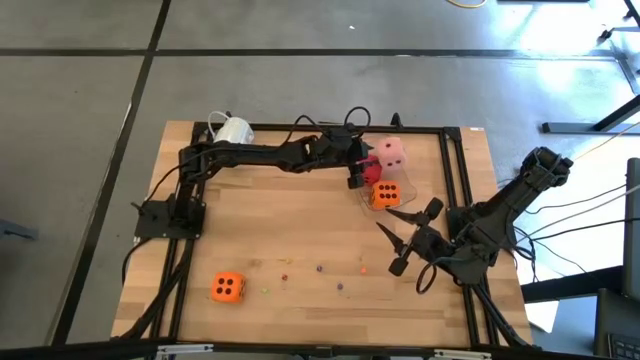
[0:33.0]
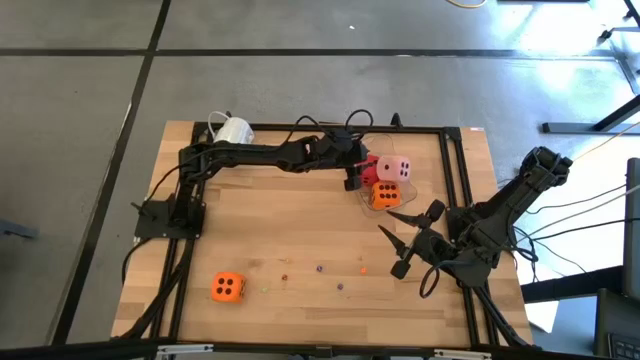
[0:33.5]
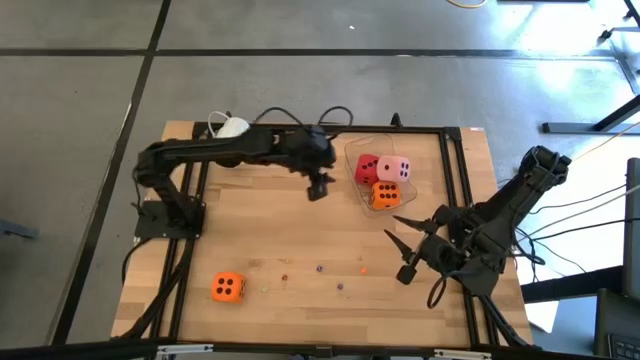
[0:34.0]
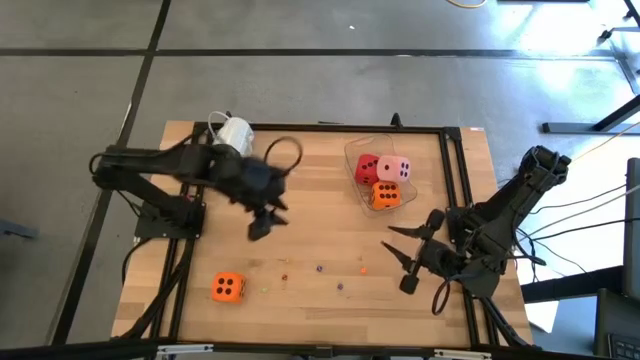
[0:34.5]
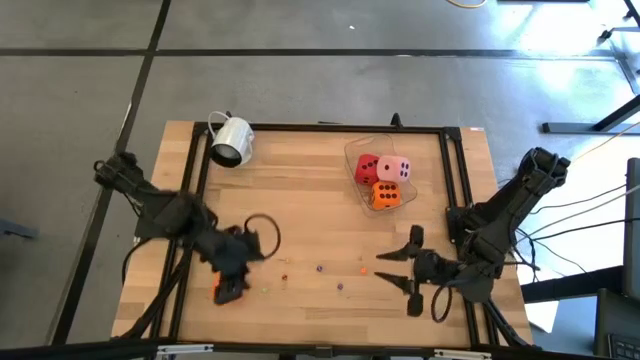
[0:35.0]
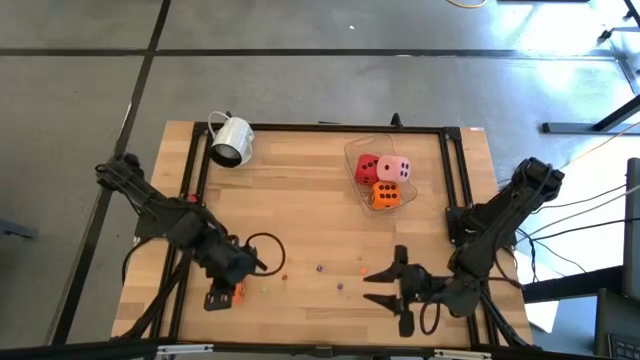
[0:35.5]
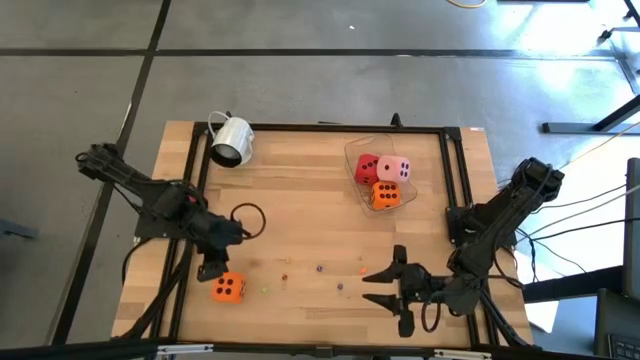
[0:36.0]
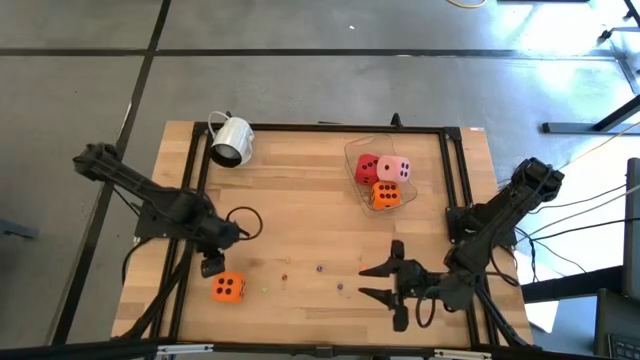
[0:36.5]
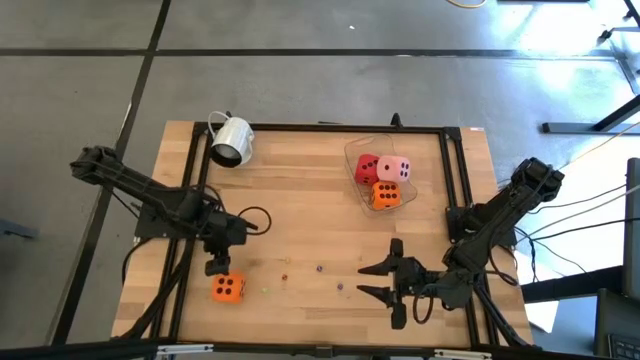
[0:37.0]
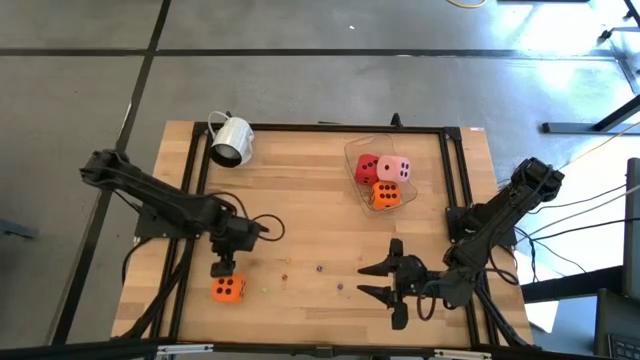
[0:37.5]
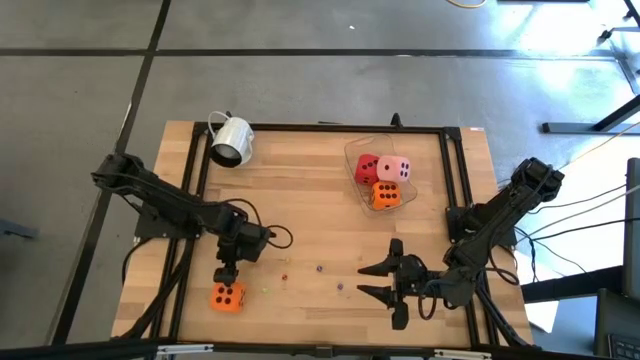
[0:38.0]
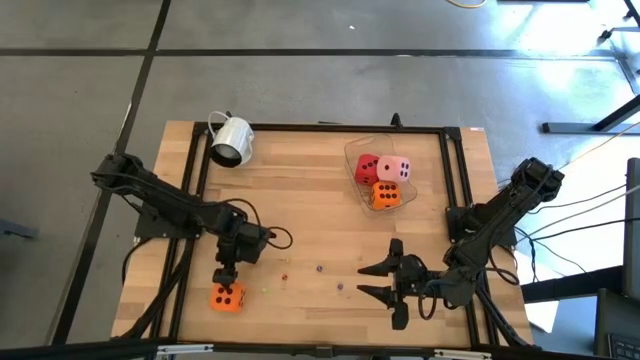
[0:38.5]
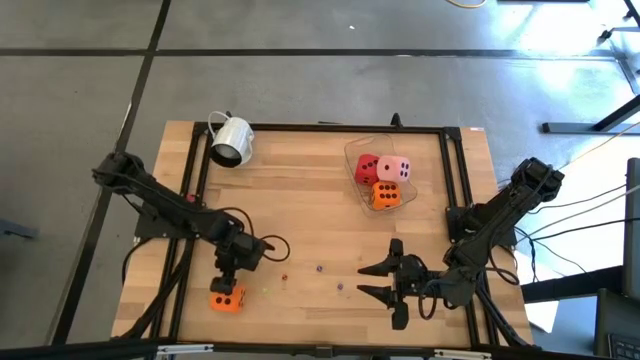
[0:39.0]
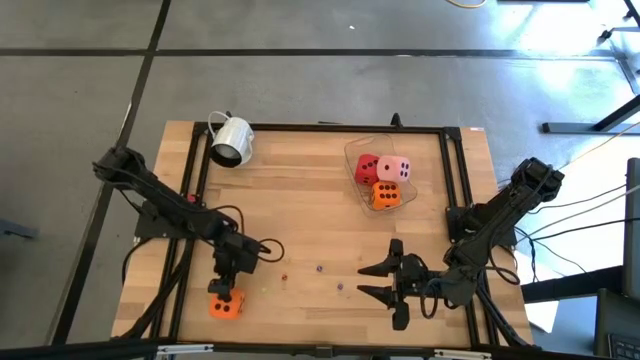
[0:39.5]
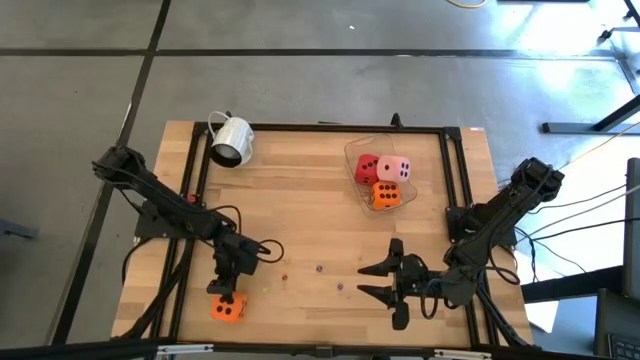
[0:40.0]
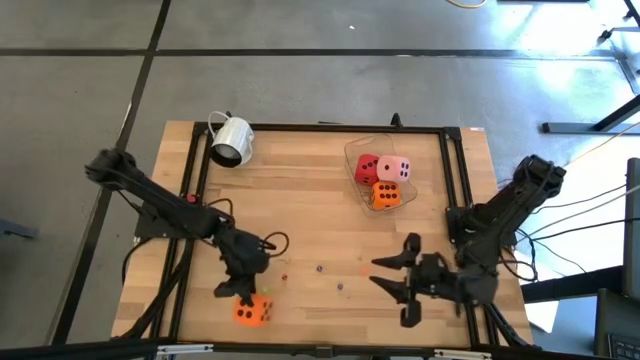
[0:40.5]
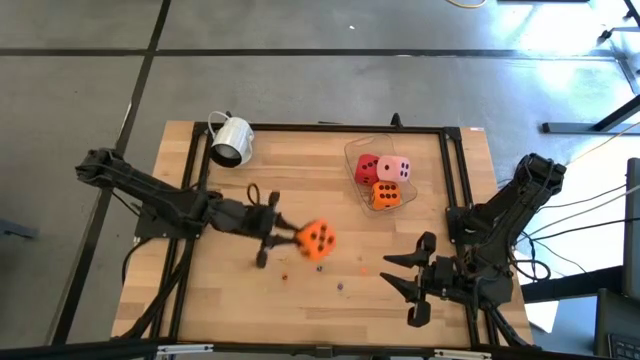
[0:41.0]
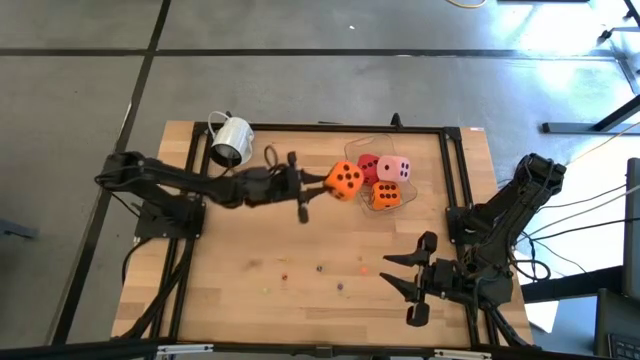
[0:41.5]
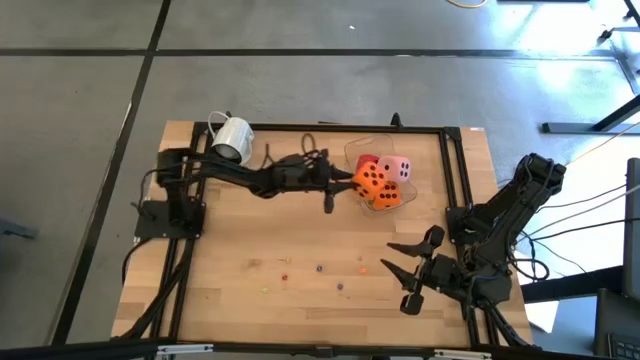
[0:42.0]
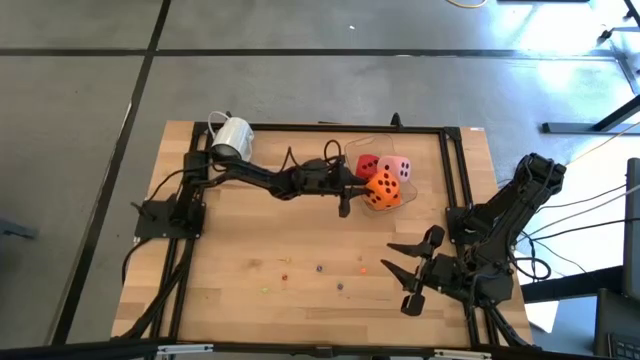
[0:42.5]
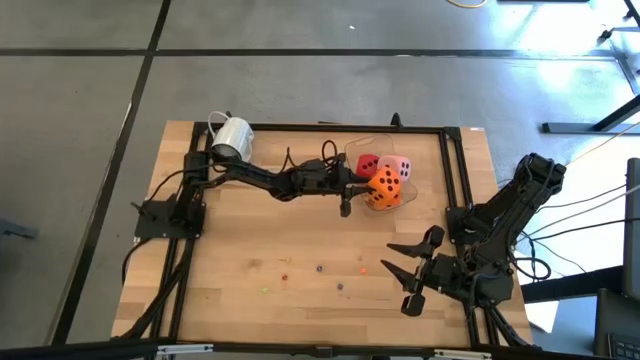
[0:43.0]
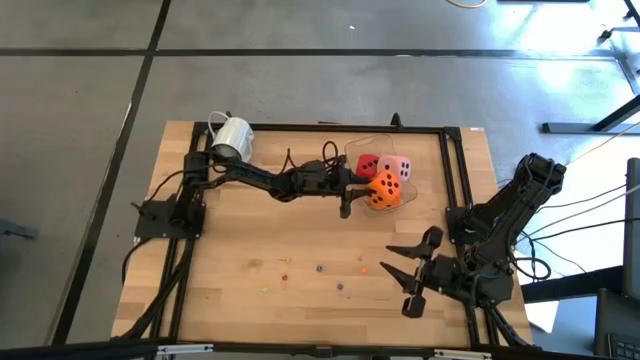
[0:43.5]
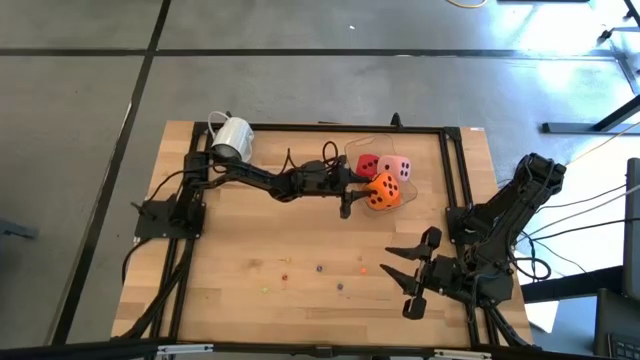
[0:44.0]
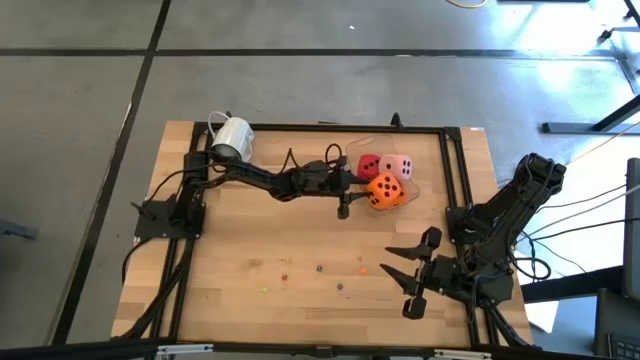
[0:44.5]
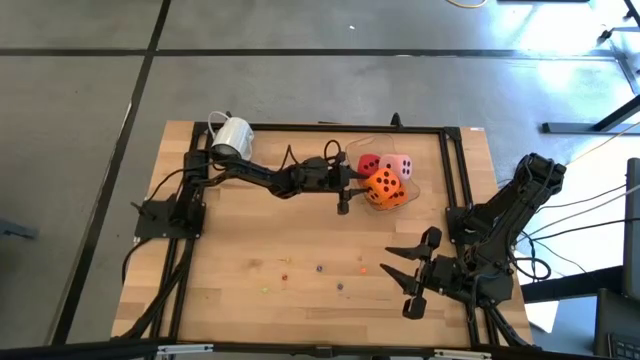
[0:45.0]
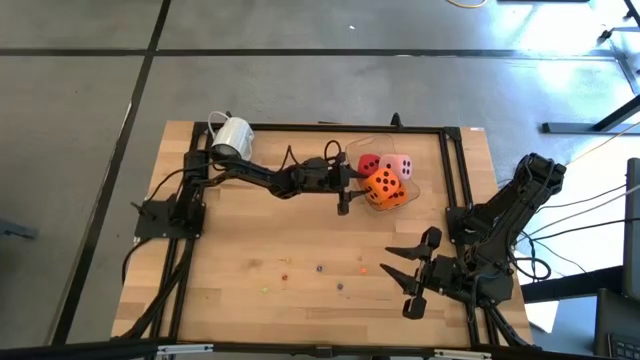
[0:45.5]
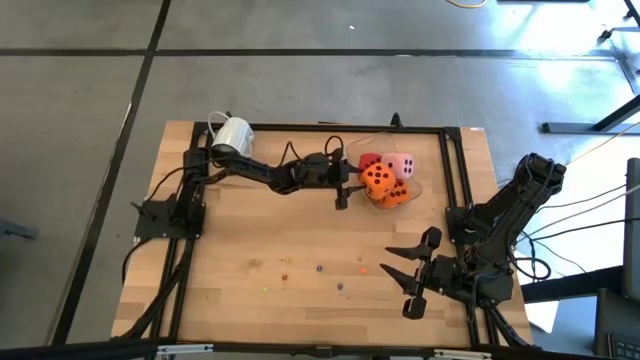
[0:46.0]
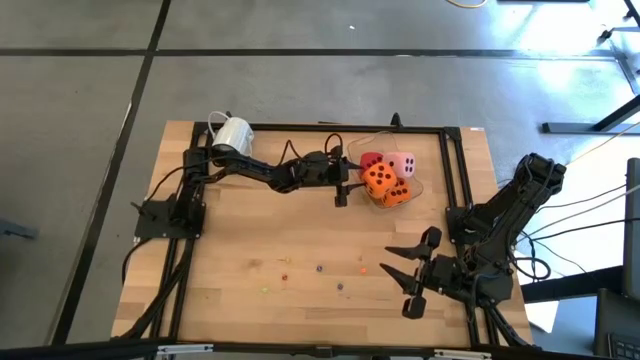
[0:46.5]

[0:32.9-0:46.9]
Task: Pick & Place Dice
Put the large orange die in the bin

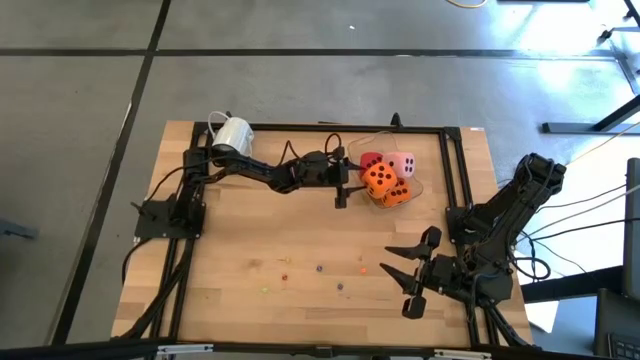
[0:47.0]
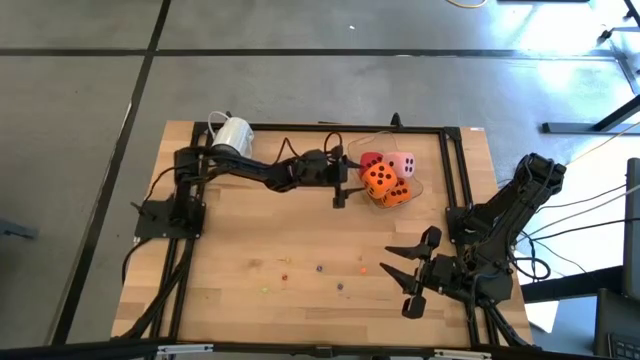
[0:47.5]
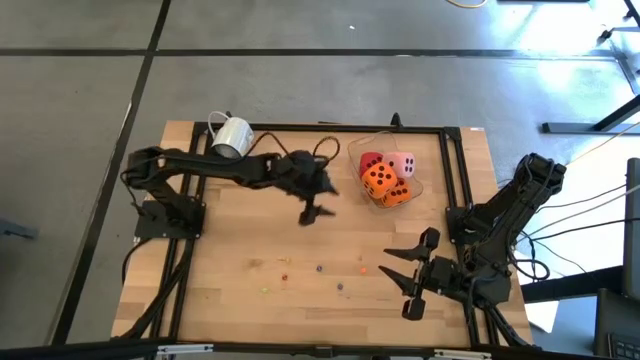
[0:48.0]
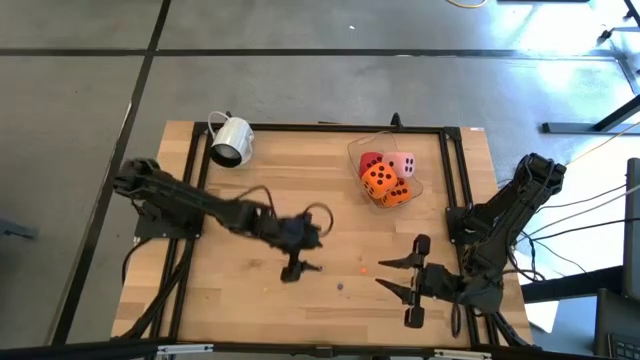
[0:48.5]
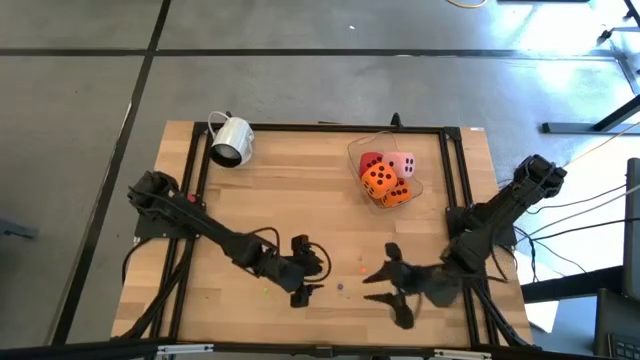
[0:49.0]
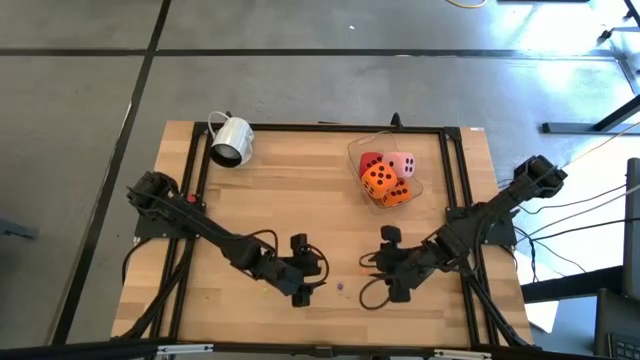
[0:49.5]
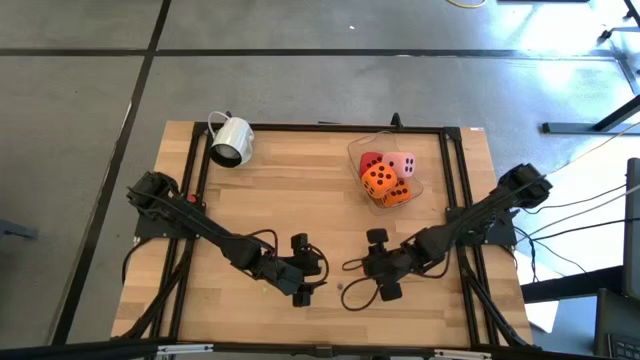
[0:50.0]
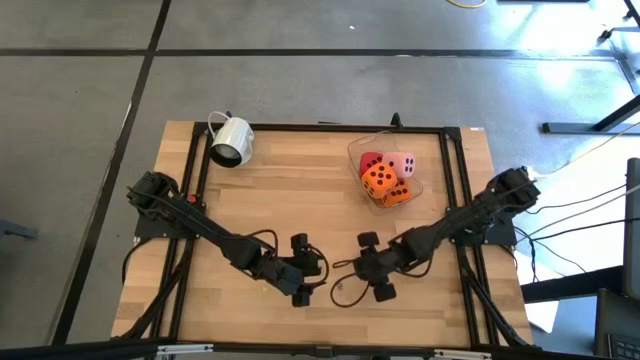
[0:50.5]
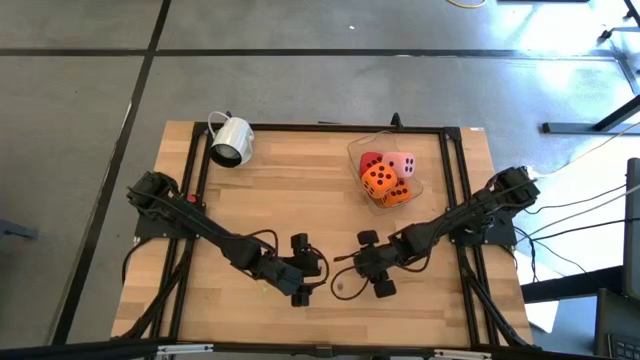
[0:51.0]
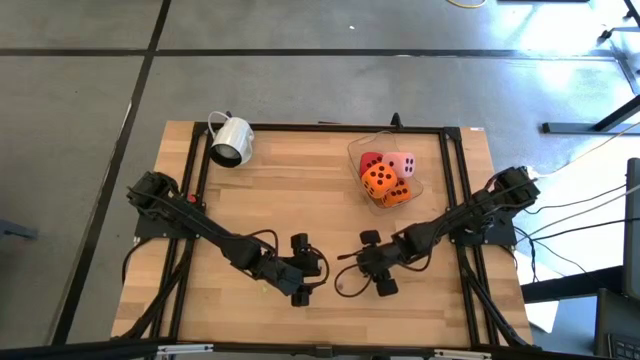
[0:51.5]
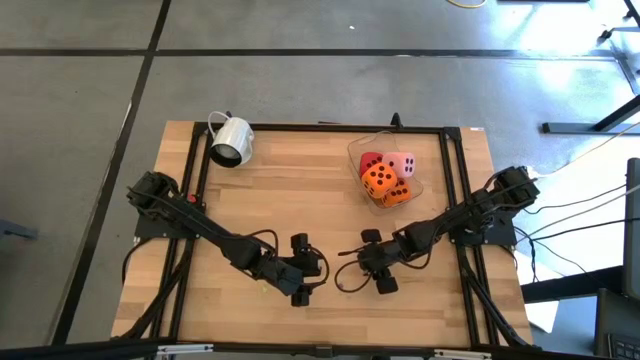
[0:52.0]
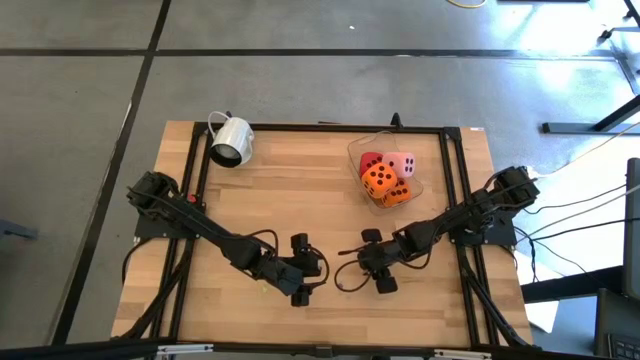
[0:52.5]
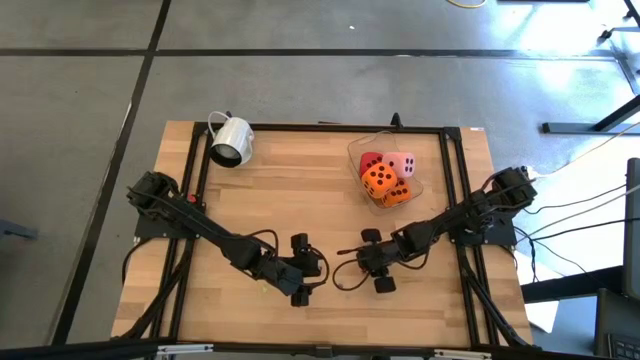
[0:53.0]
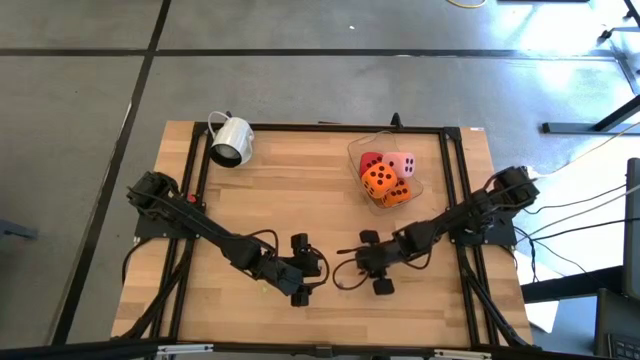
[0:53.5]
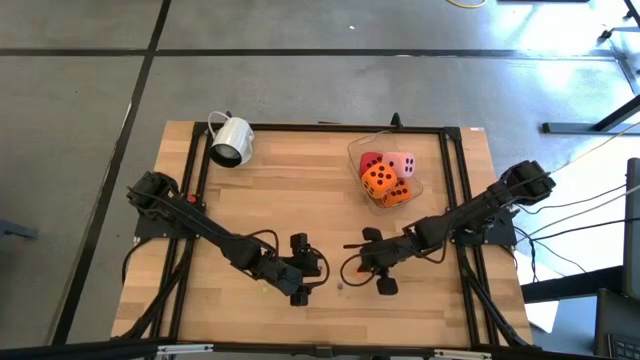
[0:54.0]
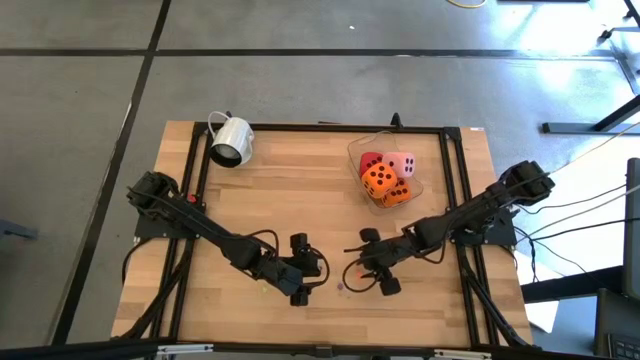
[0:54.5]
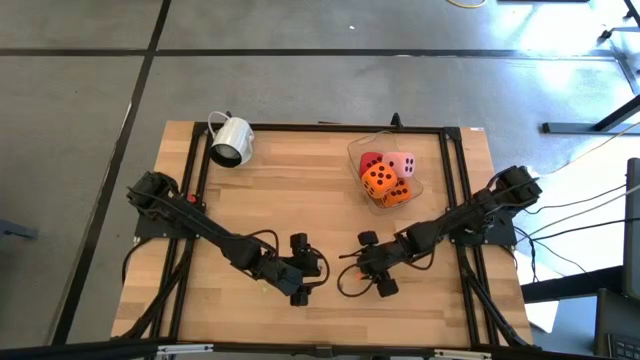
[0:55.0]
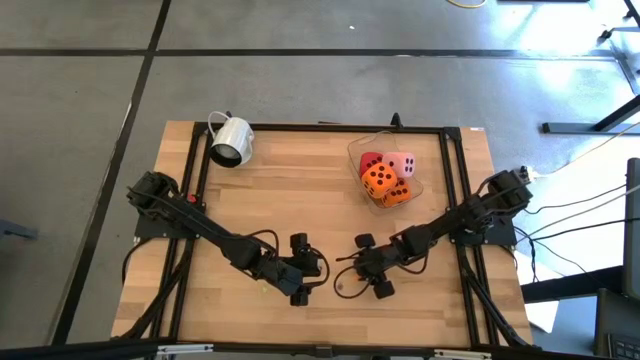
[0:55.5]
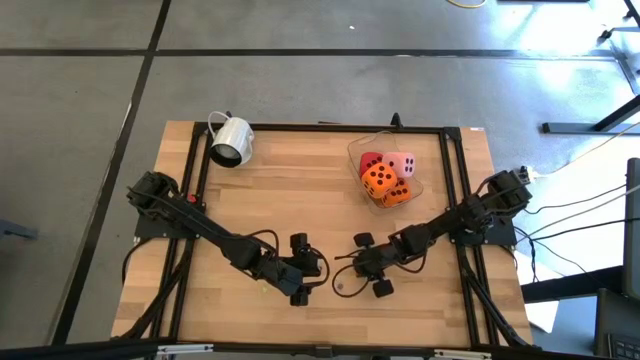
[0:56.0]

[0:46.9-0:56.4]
Put the small orange die in the bin
